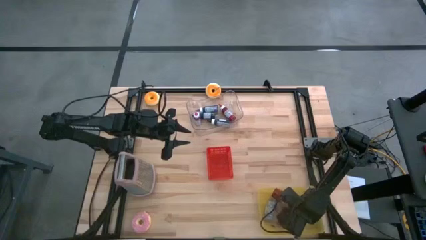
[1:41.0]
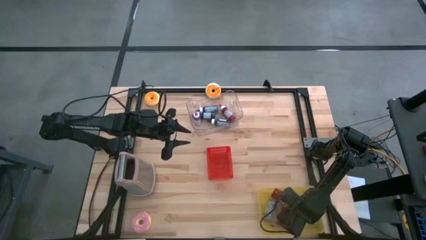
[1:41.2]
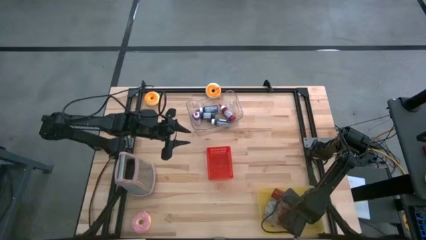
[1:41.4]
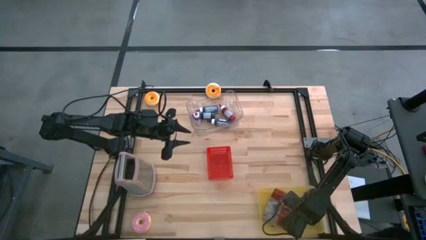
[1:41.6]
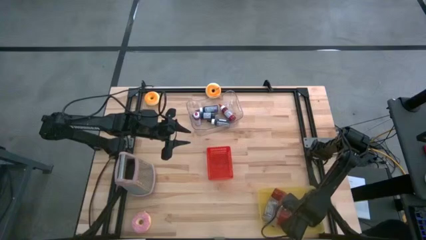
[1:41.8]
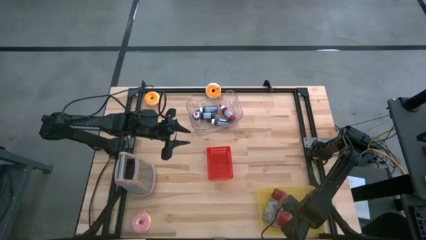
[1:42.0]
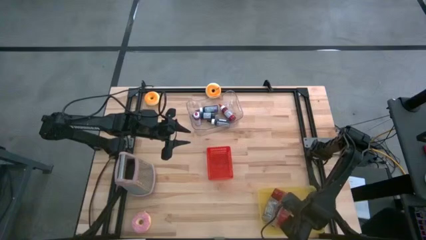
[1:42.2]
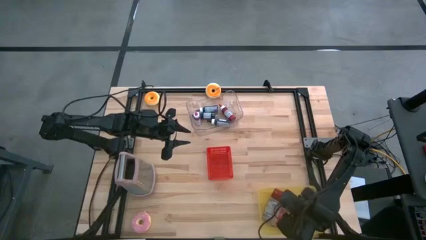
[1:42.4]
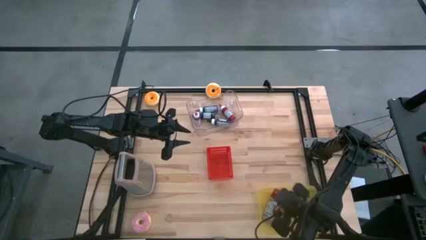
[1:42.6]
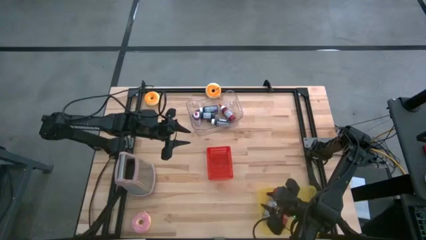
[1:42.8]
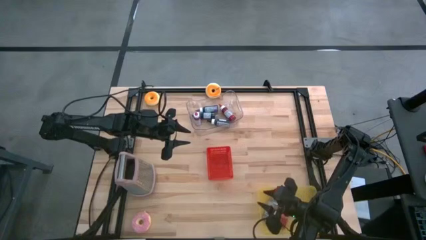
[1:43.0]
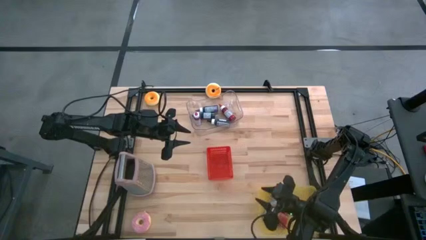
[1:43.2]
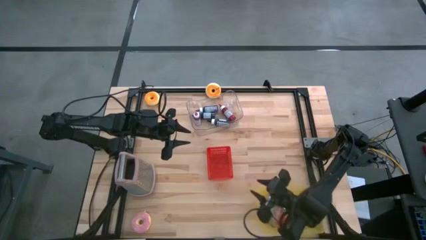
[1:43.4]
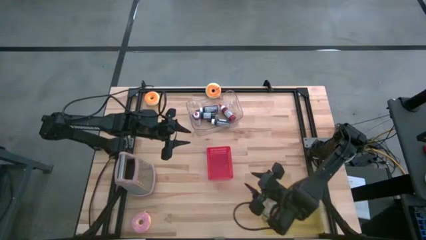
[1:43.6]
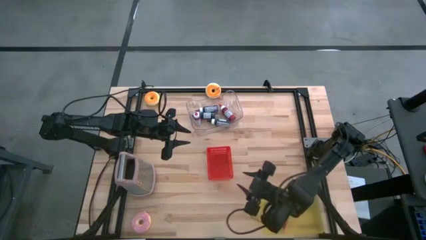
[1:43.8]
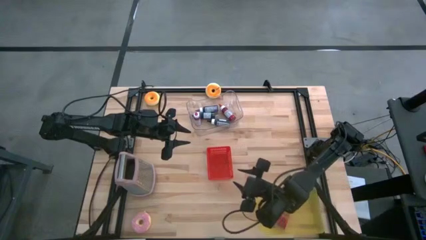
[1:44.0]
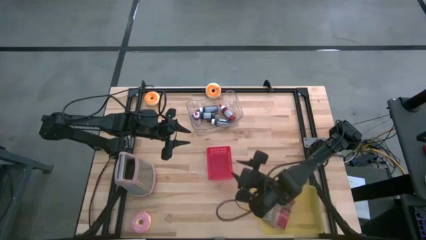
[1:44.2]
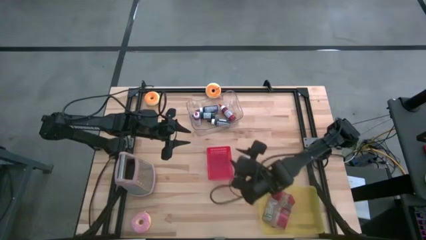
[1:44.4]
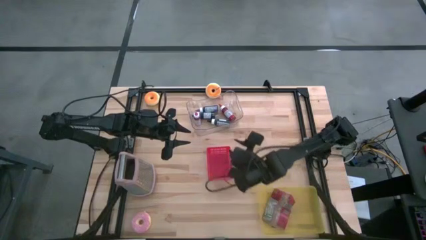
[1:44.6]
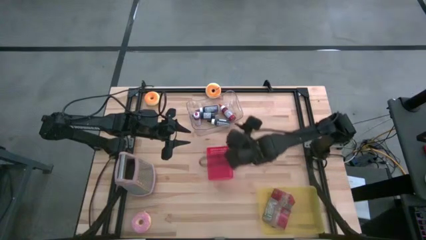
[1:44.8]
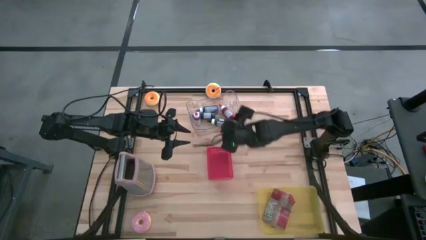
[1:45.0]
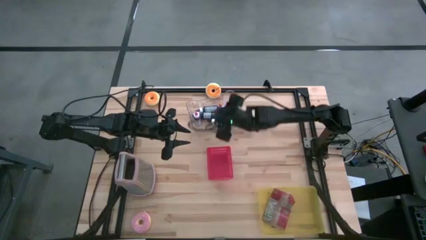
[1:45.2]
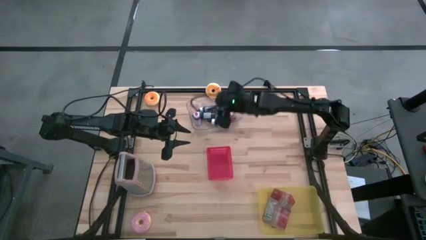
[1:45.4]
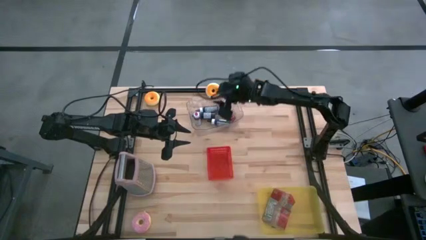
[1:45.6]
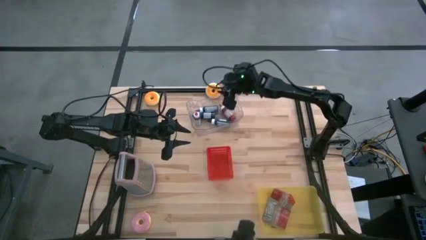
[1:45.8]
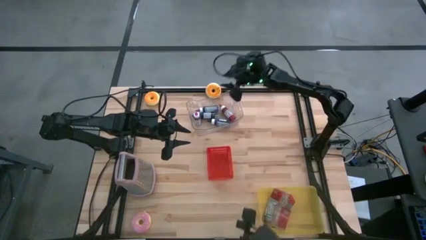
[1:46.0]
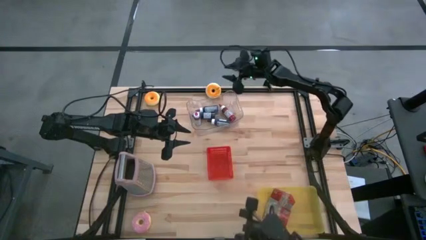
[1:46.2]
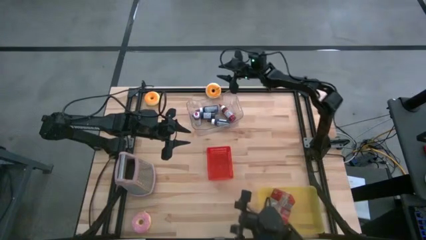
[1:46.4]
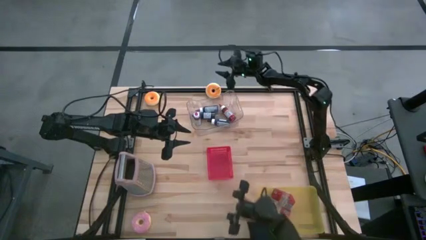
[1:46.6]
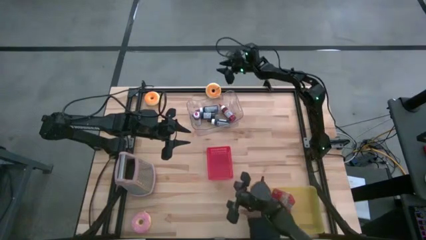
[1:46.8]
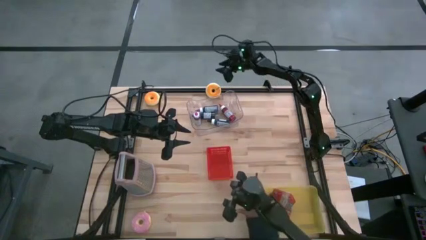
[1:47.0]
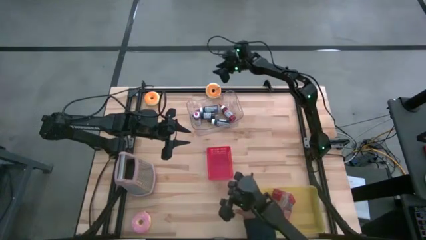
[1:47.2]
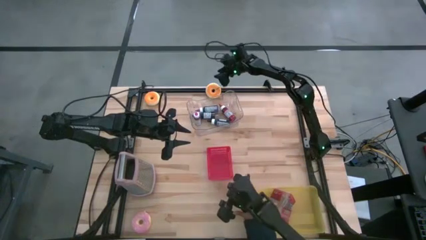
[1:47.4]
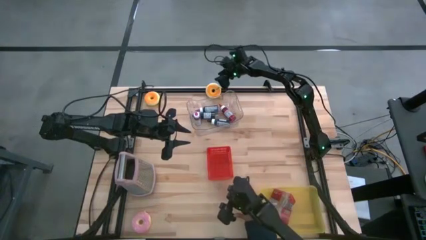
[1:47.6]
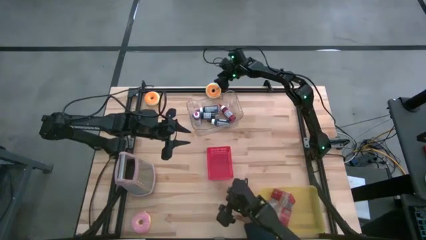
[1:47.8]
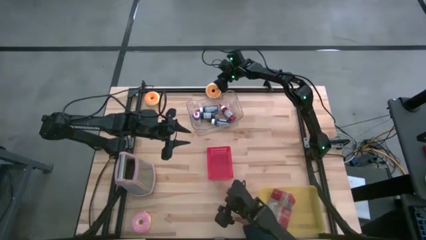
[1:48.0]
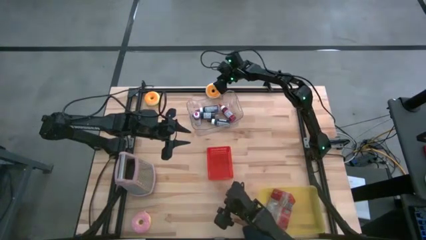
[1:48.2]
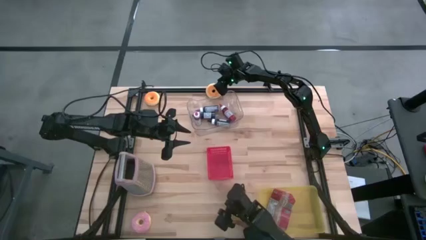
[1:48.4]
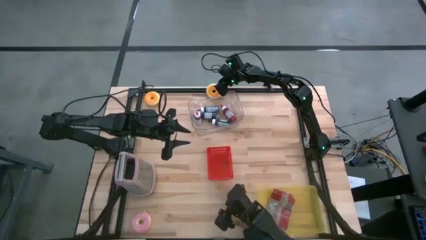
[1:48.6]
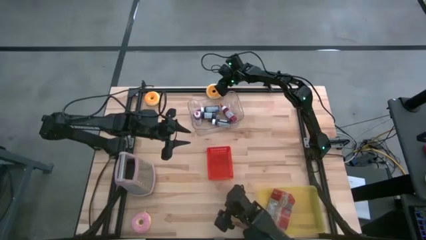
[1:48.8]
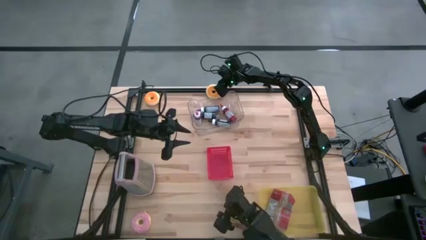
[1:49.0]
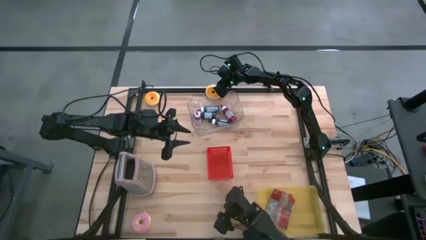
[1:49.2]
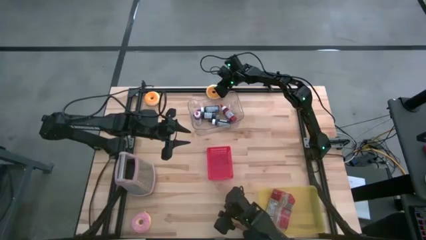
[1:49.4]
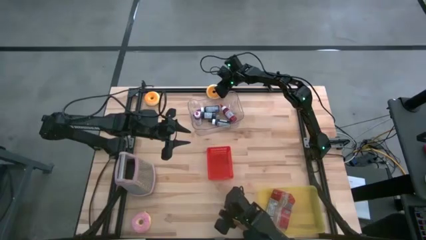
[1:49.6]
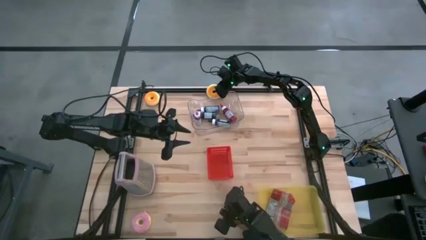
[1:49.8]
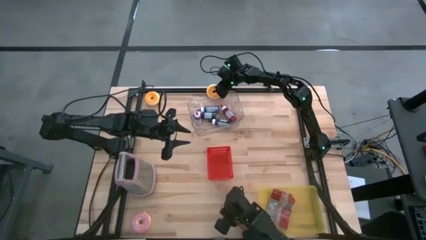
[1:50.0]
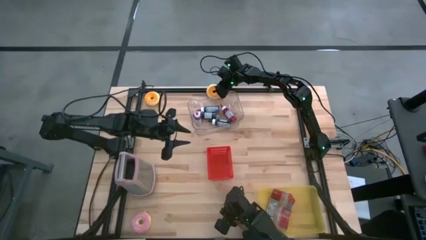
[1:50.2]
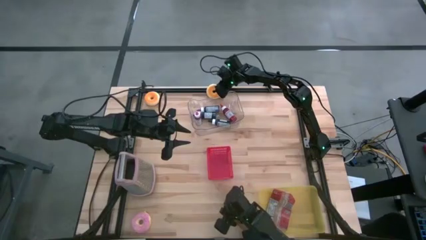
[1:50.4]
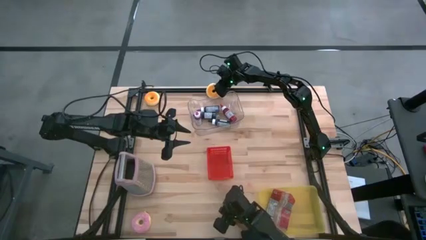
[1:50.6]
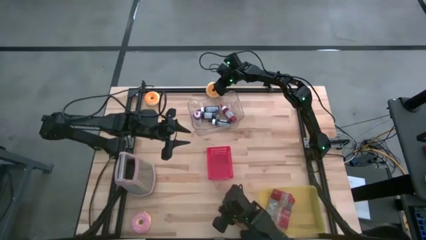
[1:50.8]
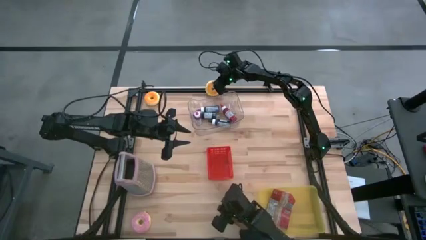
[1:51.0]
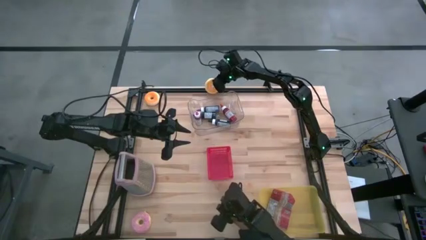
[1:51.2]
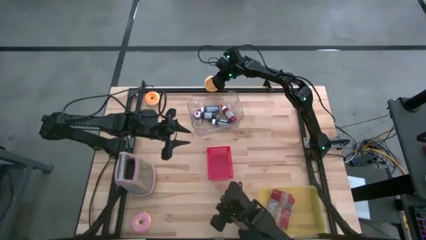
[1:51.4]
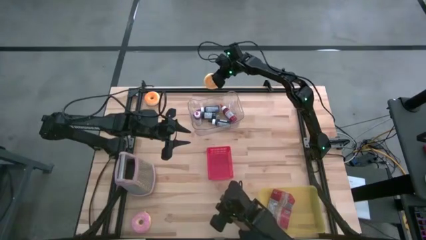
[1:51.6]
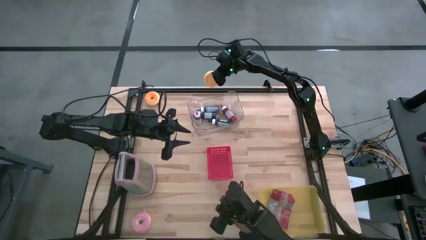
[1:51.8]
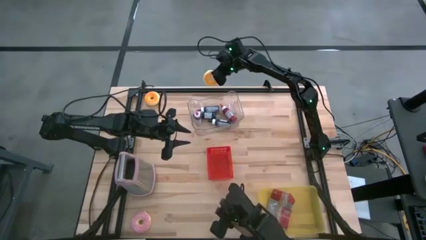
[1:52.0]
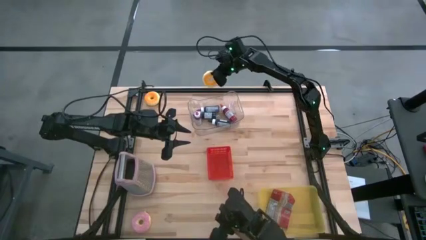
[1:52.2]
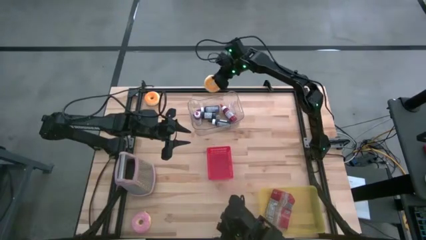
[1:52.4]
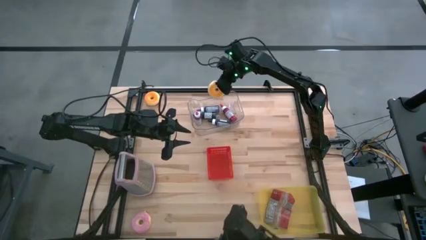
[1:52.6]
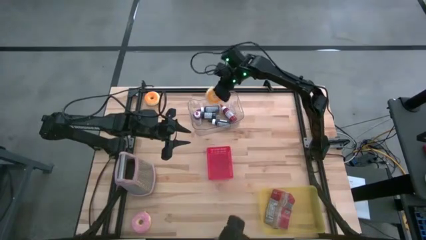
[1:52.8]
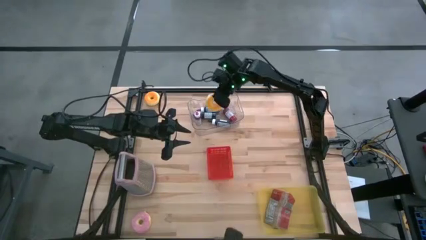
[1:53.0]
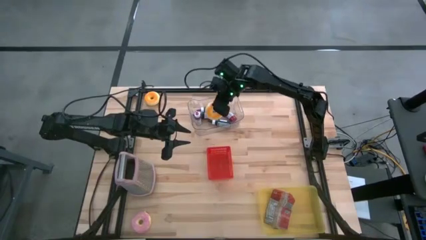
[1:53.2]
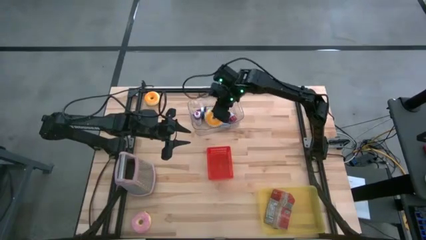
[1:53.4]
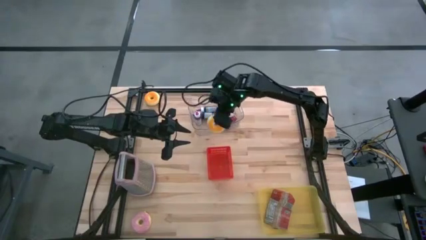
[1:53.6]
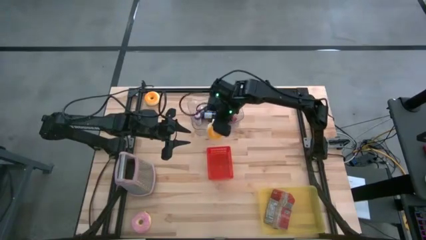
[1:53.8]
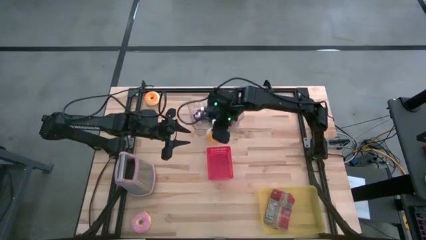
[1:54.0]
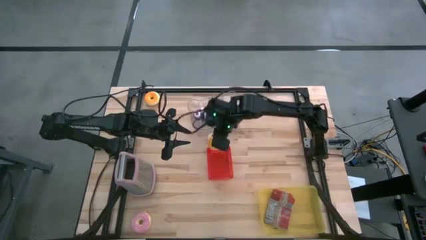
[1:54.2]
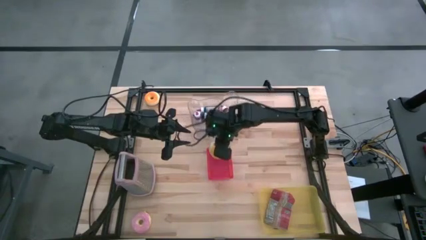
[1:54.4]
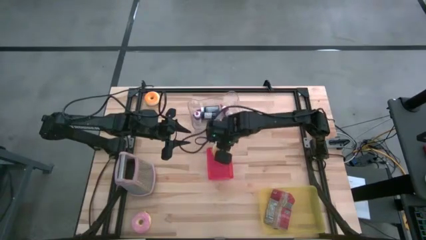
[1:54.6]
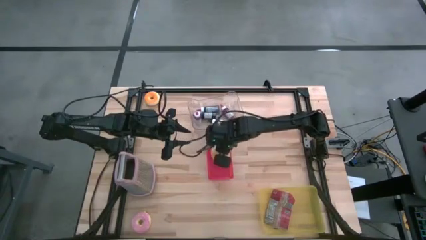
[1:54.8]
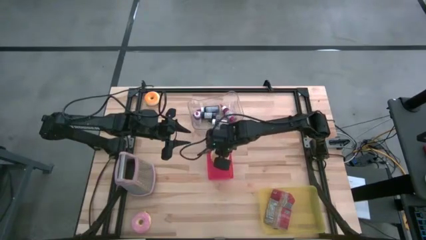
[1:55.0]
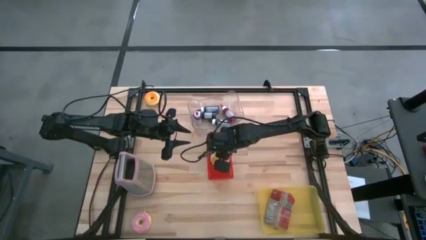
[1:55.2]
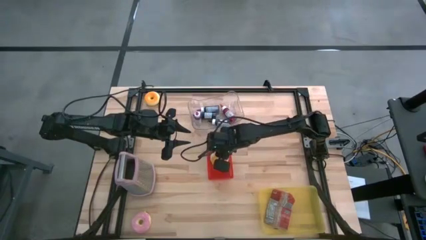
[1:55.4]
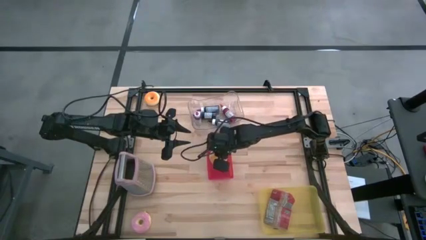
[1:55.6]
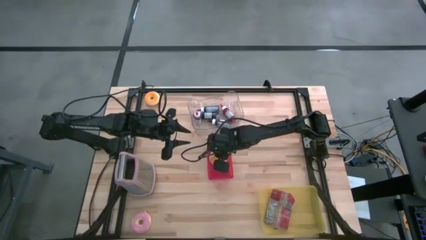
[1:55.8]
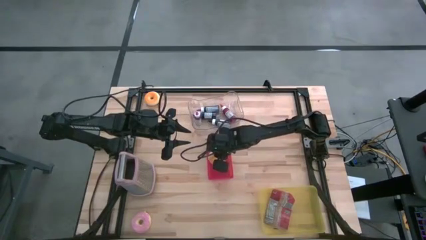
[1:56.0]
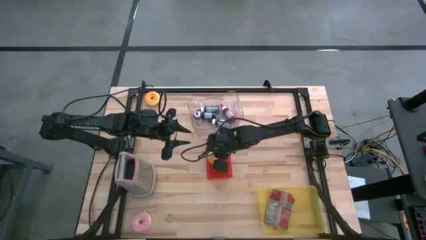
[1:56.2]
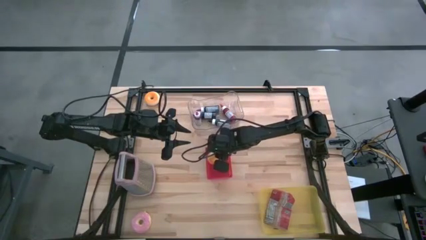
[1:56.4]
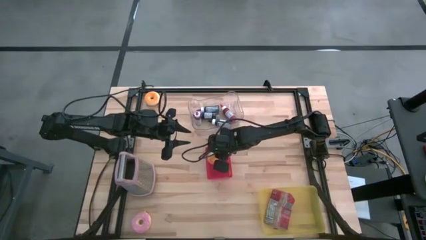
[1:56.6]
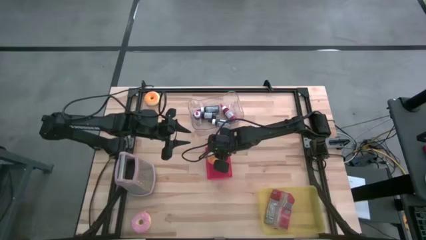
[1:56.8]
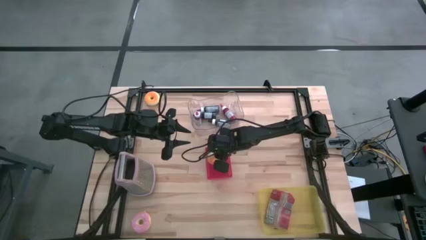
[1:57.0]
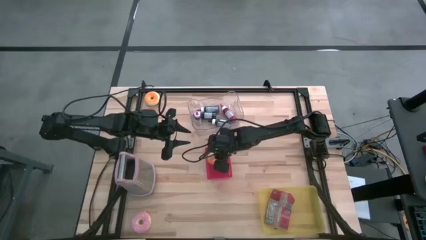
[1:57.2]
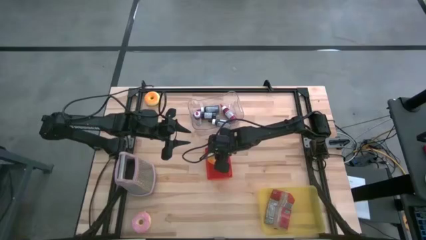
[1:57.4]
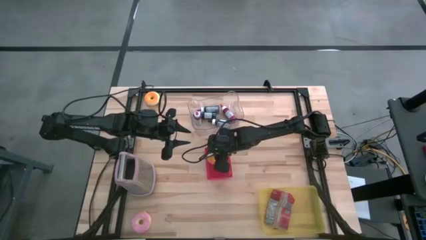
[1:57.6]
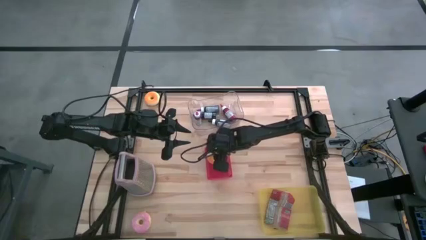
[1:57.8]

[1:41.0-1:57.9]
Task: Pick & Place Food Item
Put the green donut into the red bin

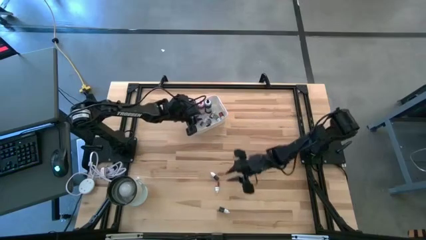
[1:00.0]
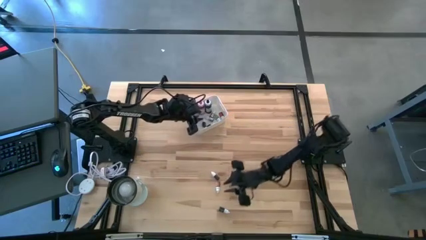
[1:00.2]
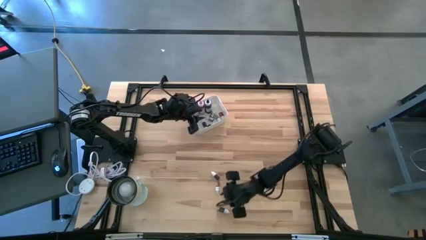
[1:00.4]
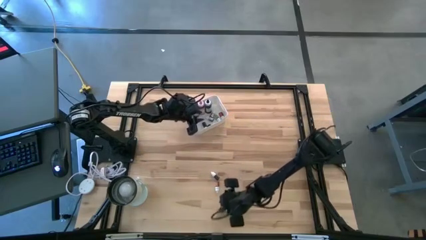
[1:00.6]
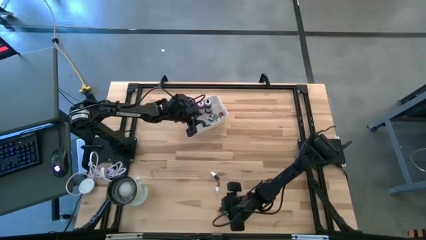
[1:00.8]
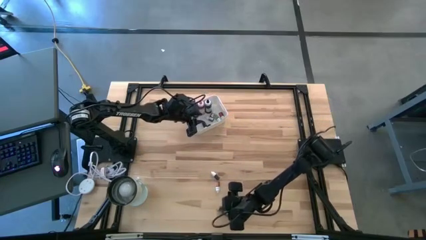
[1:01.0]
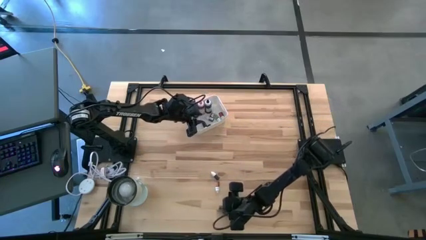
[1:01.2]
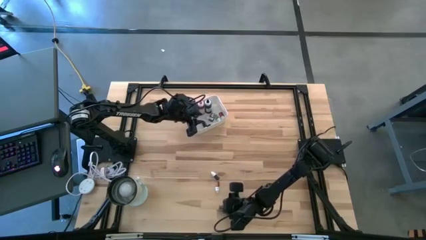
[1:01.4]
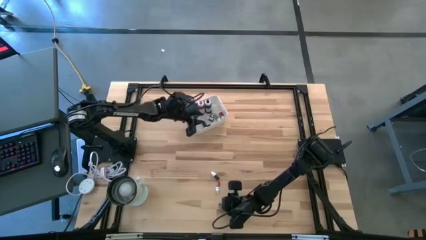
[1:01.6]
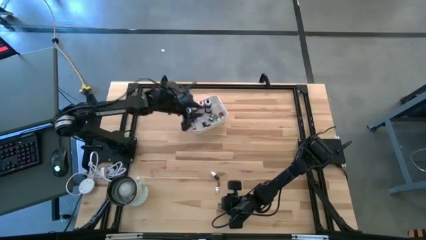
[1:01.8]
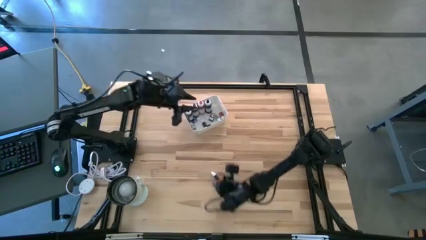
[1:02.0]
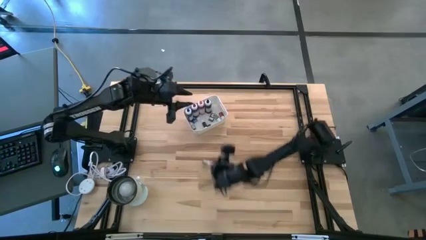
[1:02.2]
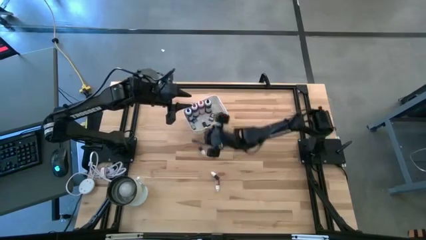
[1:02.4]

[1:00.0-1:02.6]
Task: Pick & Place food coloring
Put the small dark green food coloring bottle into the white bin
